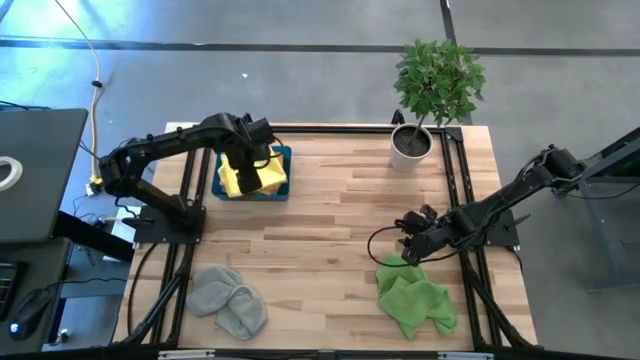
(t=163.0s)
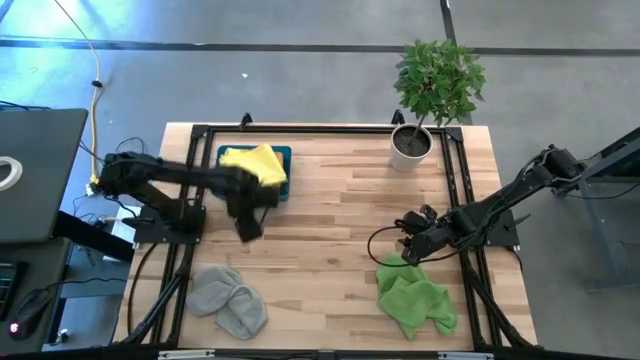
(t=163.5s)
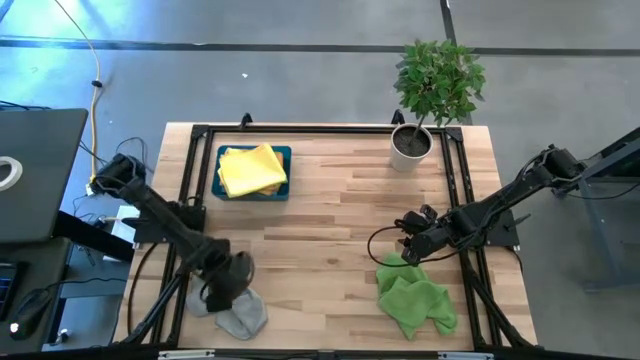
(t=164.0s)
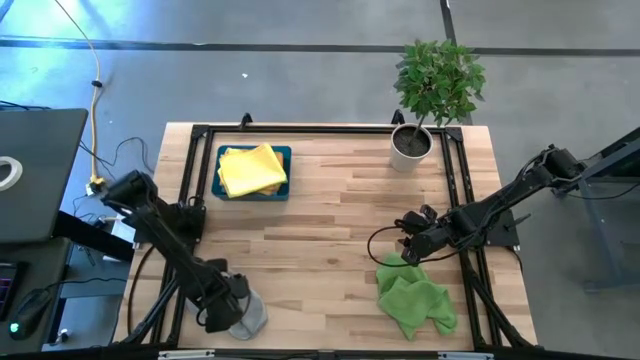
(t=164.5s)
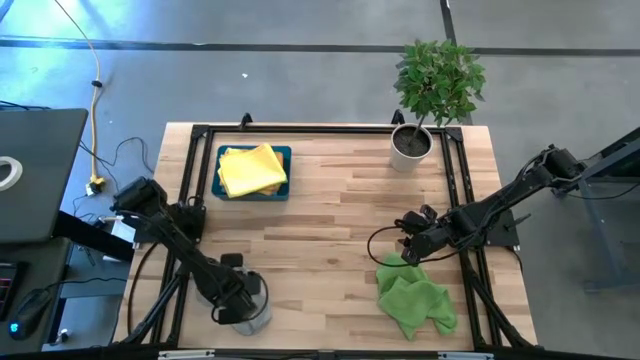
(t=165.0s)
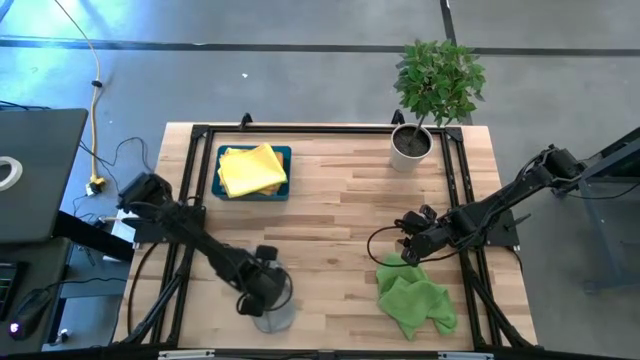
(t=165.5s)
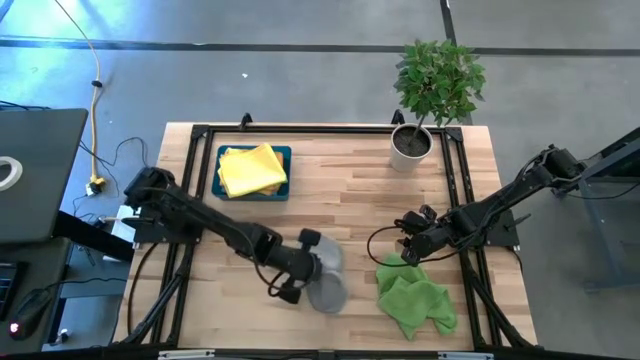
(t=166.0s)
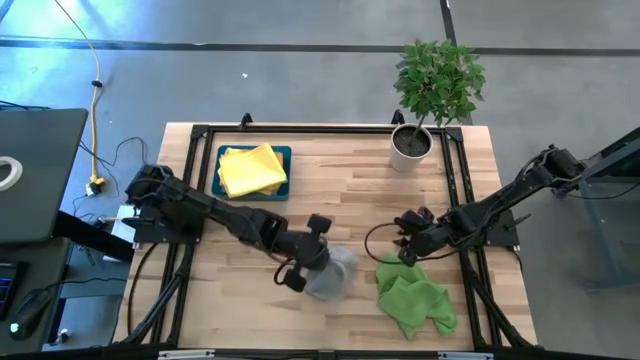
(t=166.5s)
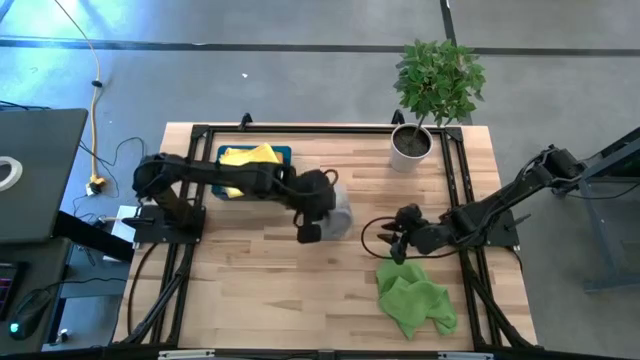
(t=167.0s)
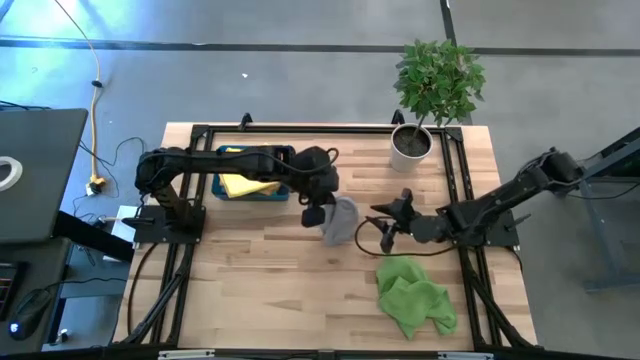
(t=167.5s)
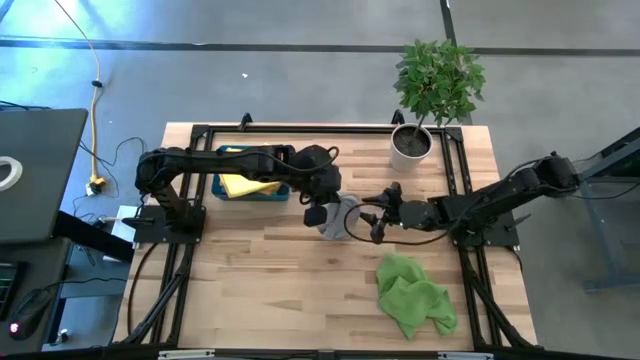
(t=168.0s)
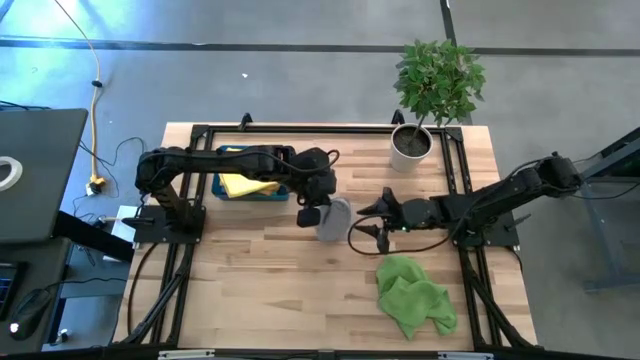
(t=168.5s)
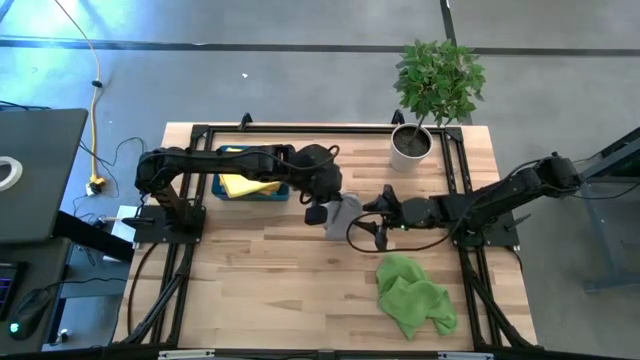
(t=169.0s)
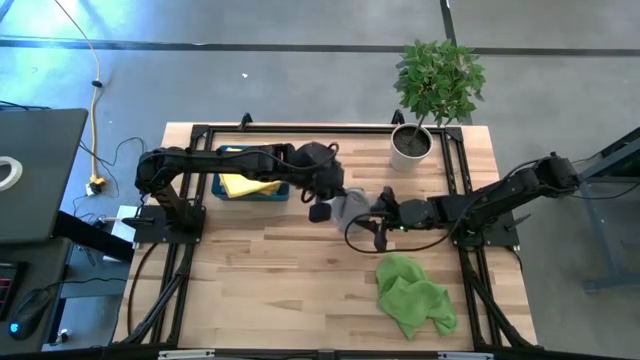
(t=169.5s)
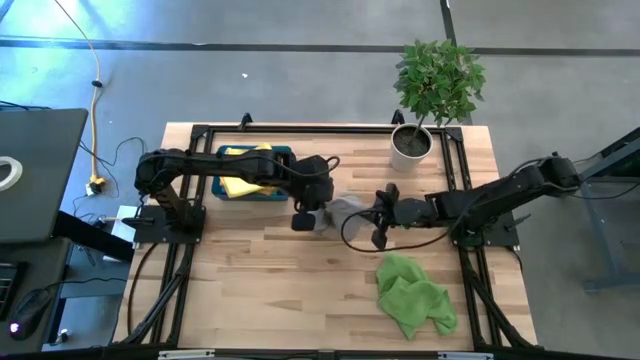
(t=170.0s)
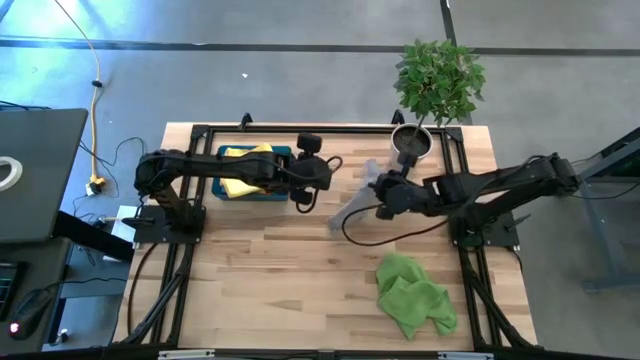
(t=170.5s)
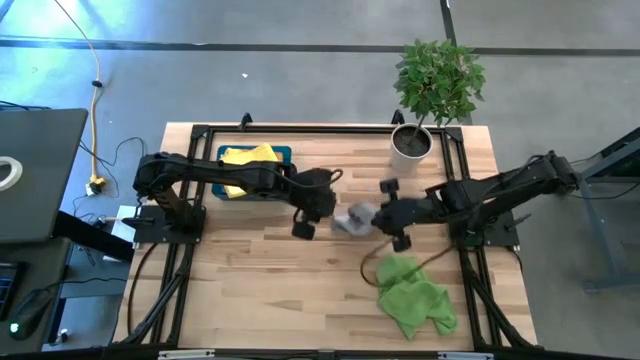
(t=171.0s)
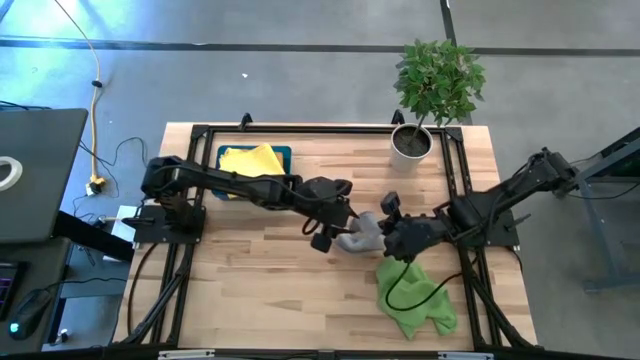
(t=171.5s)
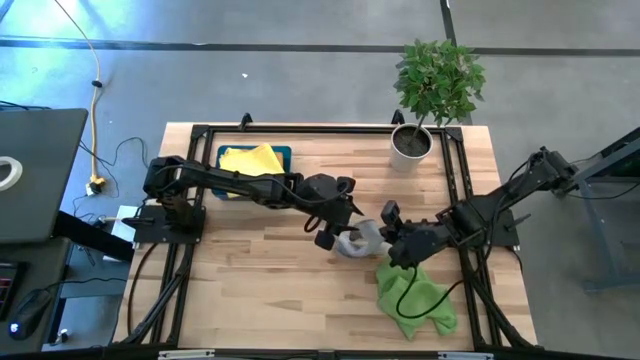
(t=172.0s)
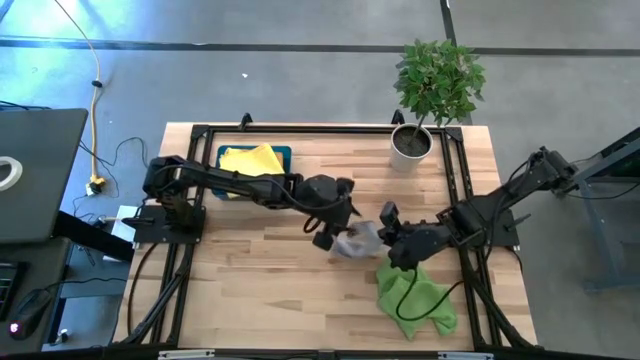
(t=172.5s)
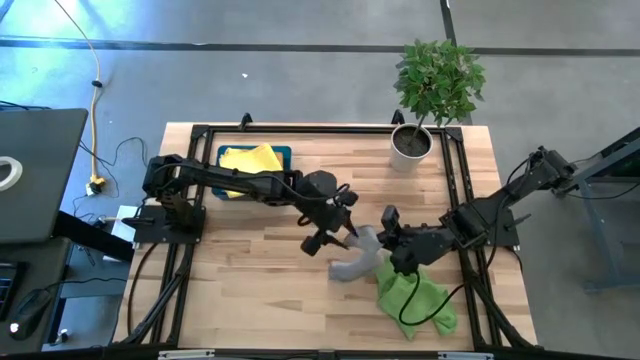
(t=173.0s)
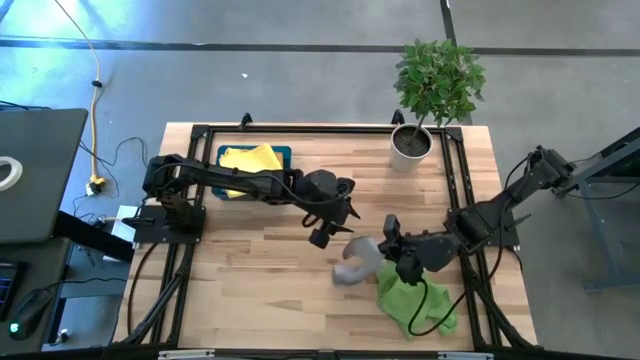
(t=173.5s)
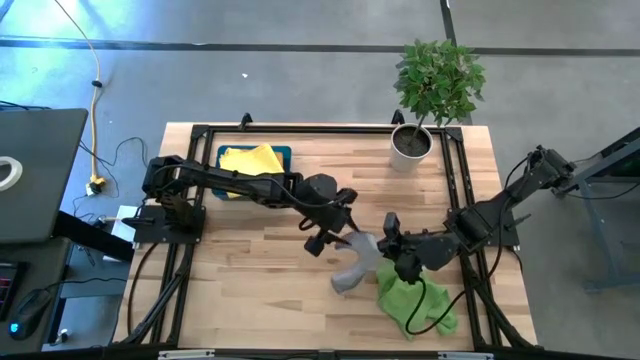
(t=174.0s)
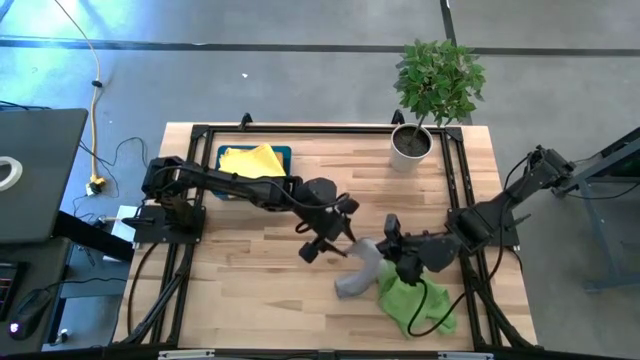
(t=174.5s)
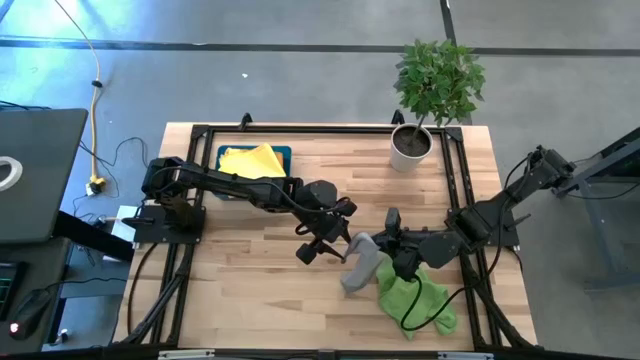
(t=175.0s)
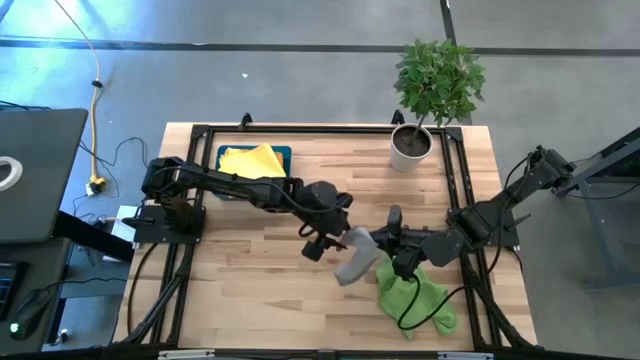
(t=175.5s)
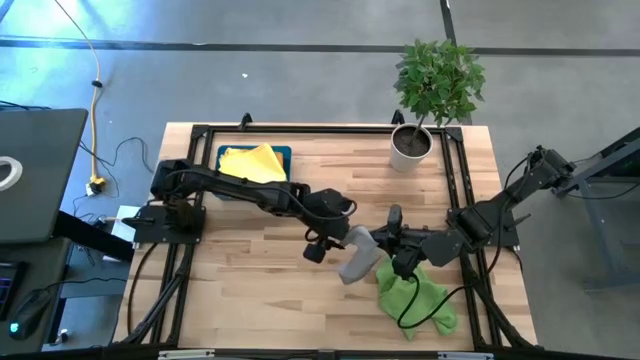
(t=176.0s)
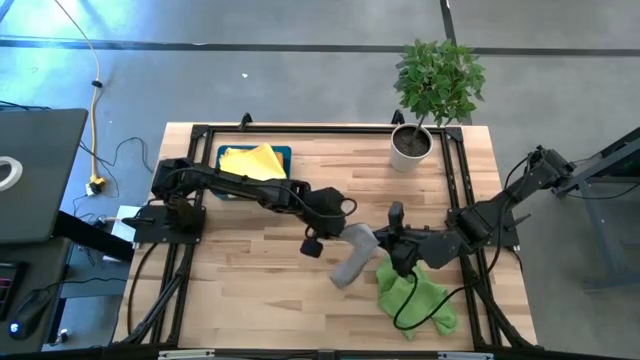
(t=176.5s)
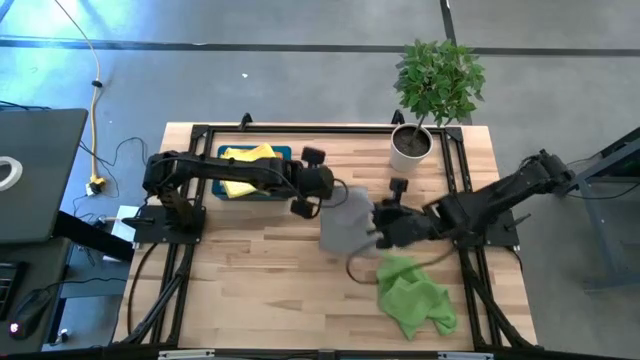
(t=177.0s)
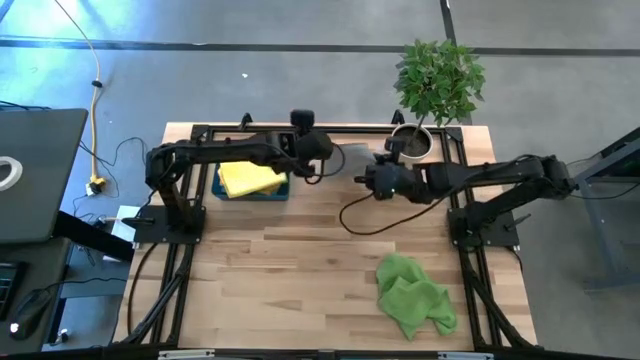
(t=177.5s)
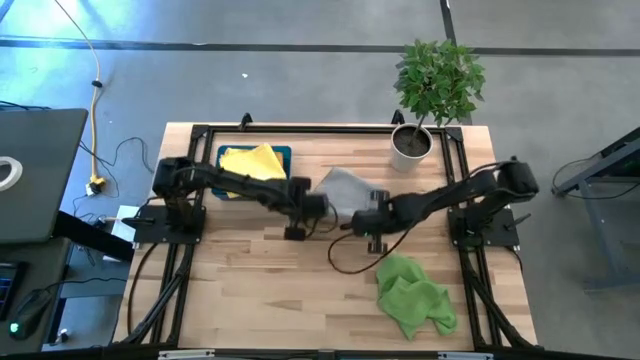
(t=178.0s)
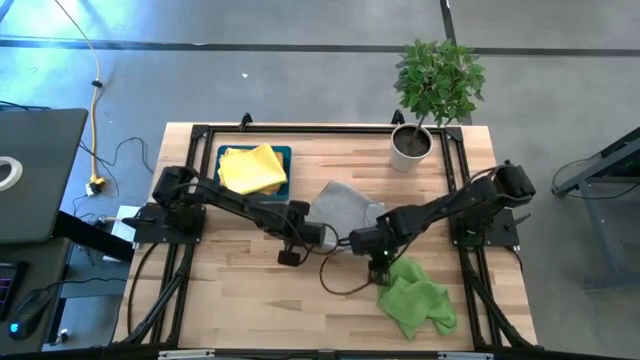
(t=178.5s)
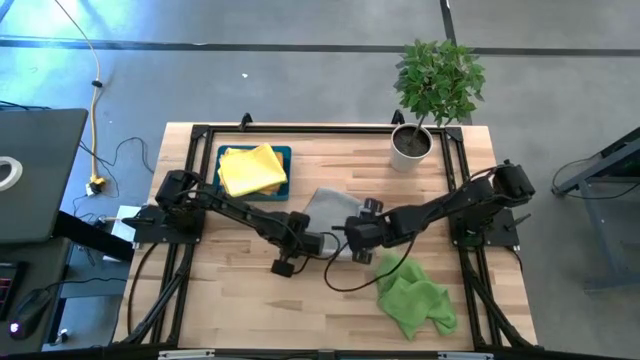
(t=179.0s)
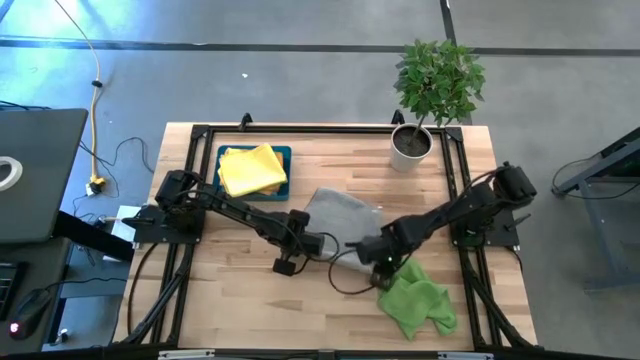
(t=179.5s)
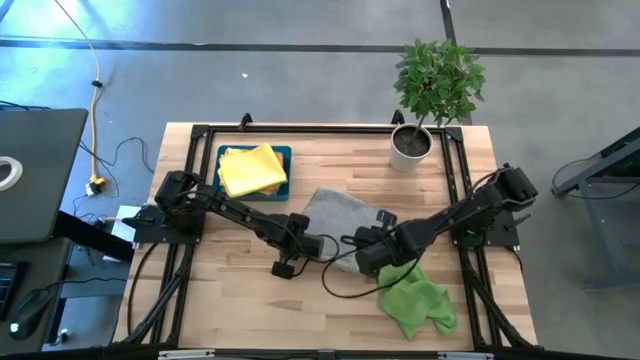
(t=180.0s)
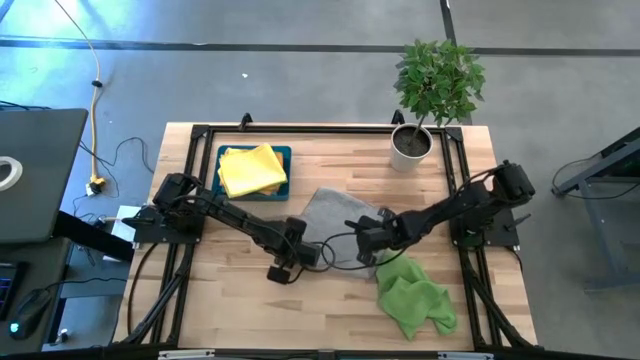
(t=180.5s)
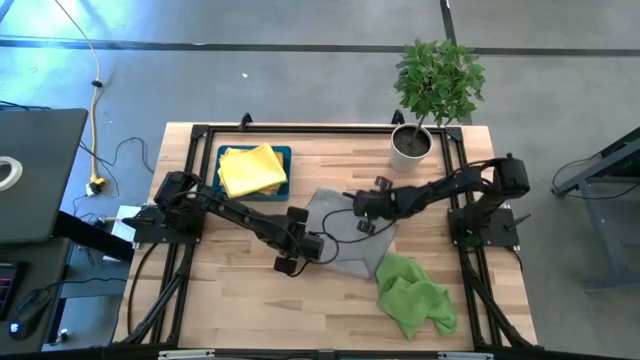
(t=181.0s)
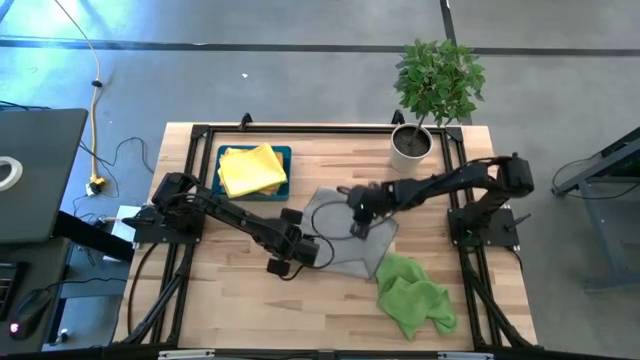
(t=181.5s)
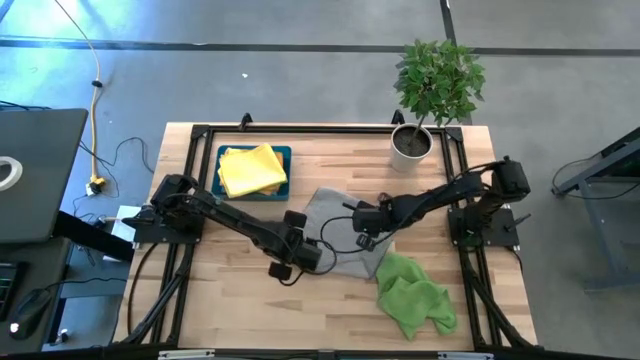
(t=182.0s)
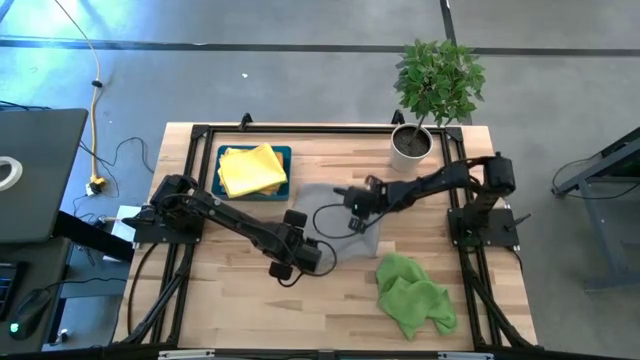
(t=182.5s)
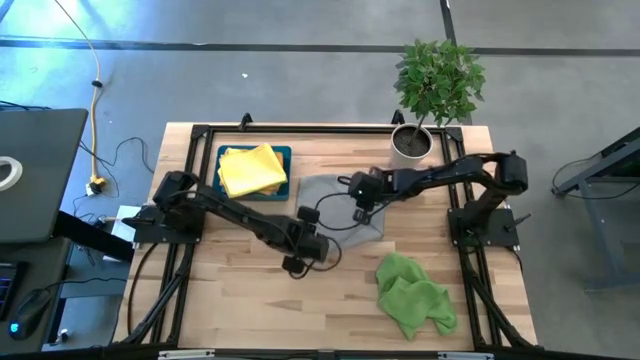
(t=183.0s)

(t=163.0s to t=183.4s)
Task: Fold microfiber towels
Fold the gray microfiber cloth
